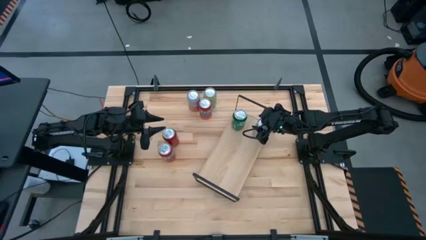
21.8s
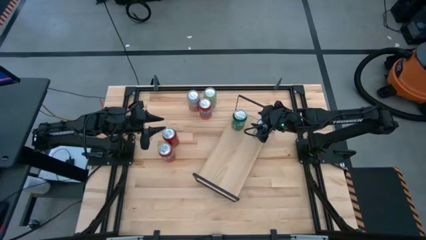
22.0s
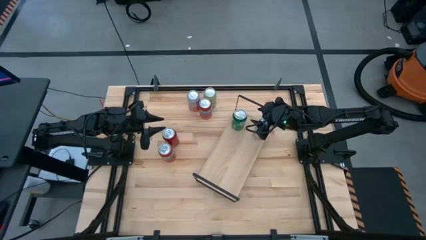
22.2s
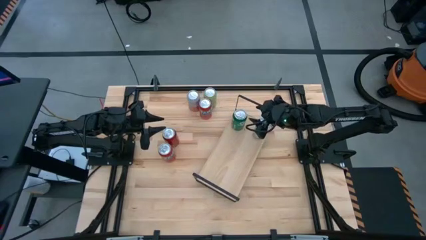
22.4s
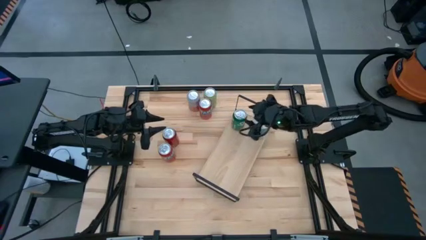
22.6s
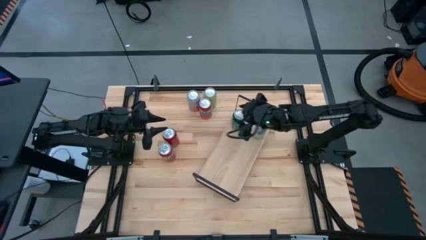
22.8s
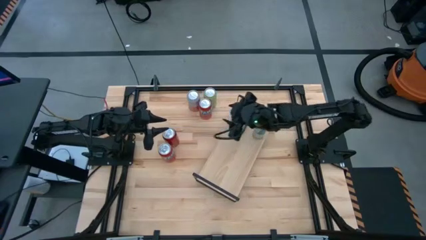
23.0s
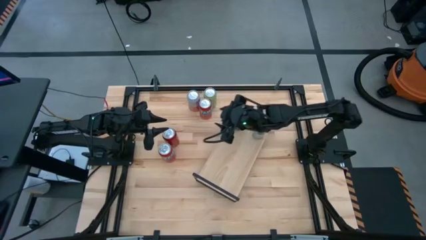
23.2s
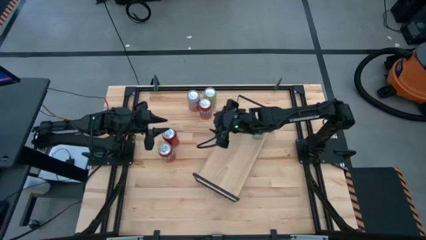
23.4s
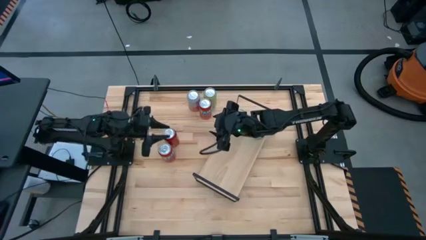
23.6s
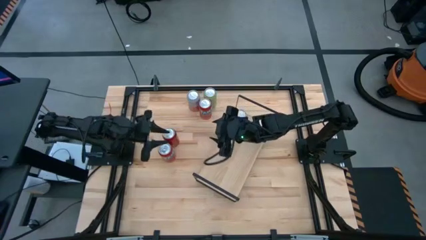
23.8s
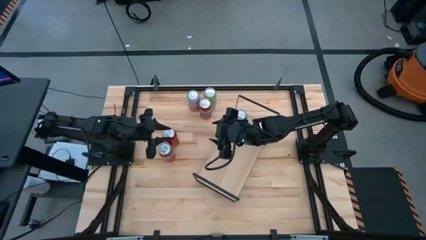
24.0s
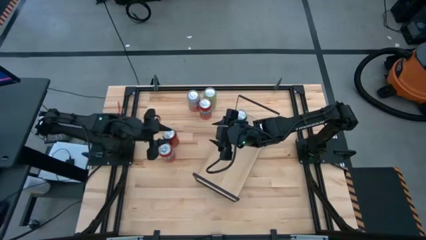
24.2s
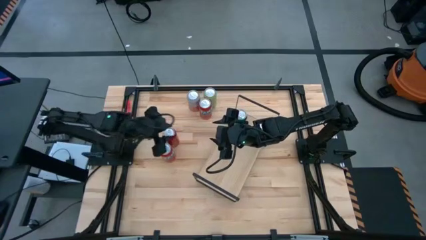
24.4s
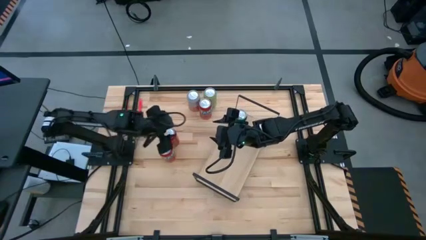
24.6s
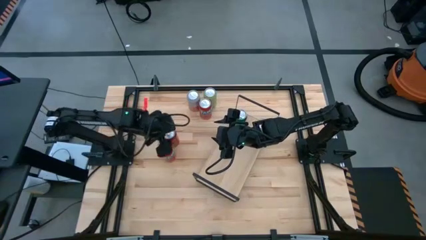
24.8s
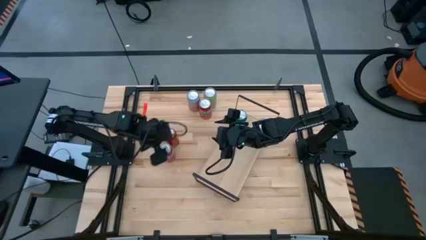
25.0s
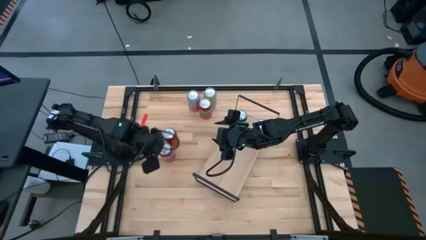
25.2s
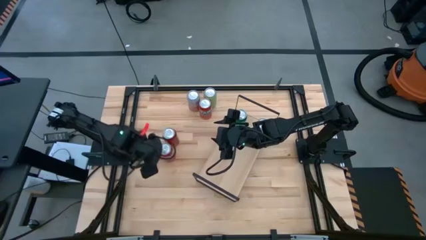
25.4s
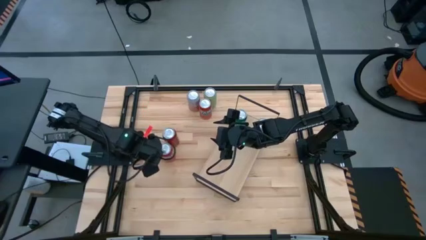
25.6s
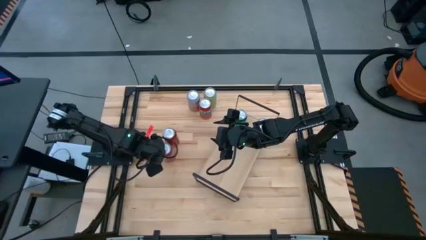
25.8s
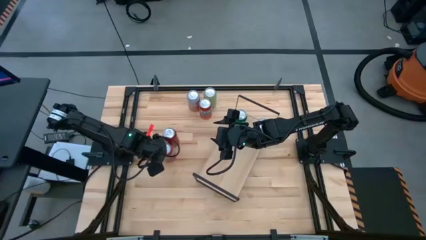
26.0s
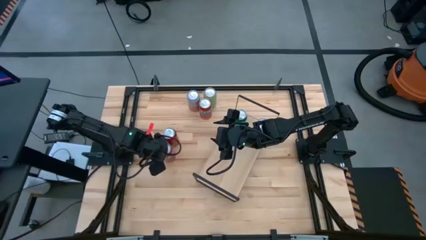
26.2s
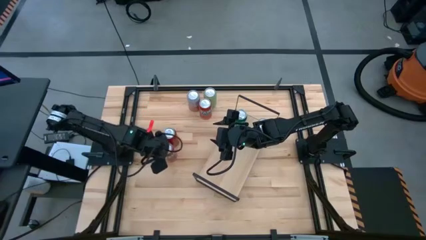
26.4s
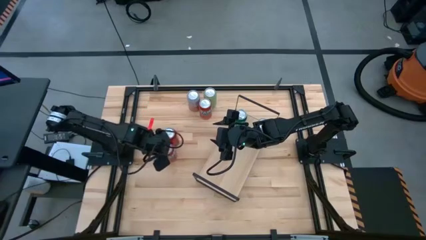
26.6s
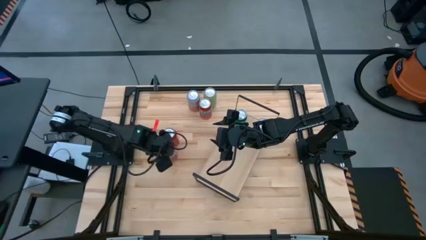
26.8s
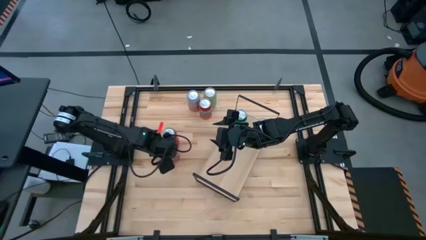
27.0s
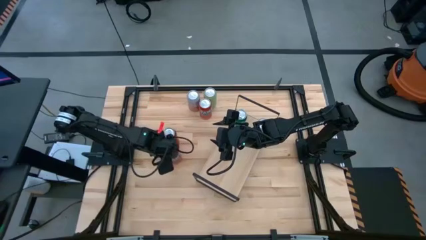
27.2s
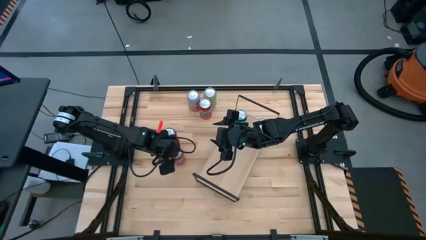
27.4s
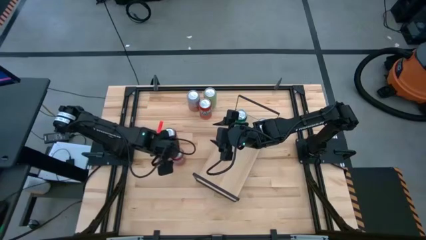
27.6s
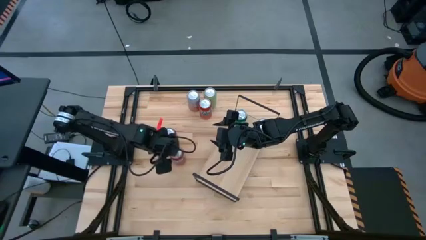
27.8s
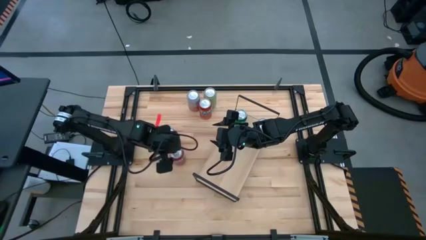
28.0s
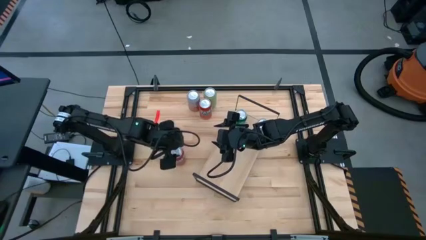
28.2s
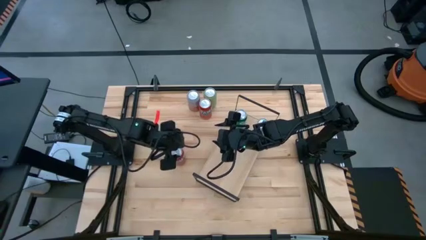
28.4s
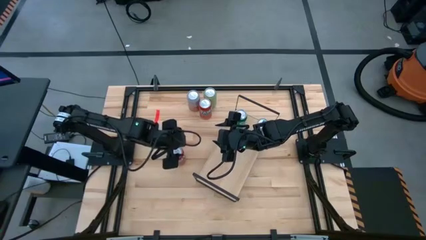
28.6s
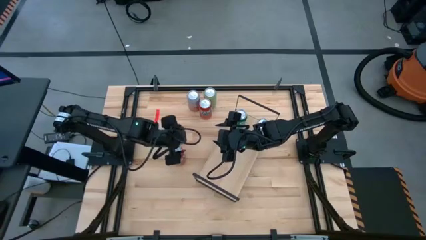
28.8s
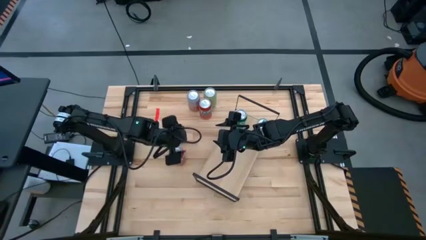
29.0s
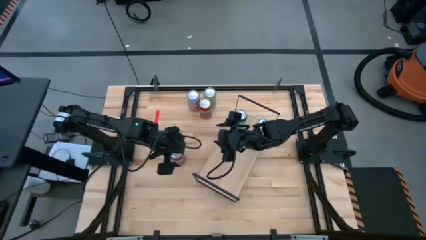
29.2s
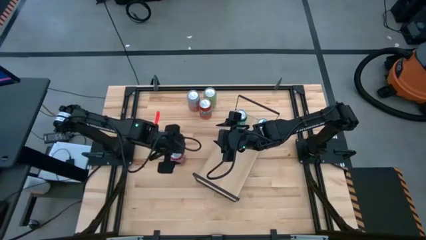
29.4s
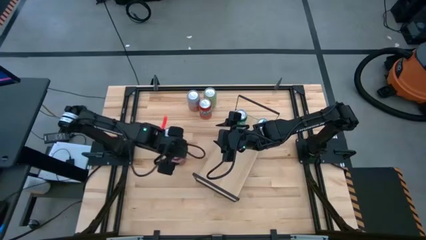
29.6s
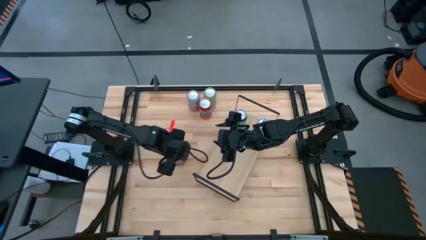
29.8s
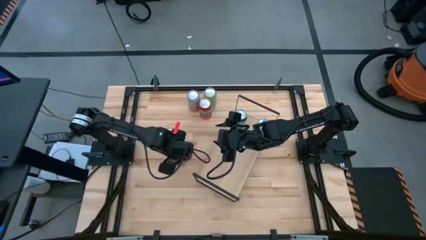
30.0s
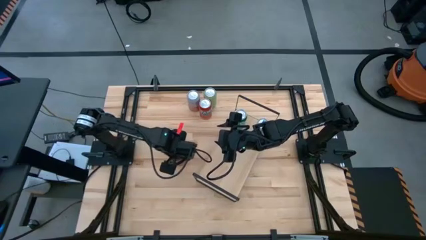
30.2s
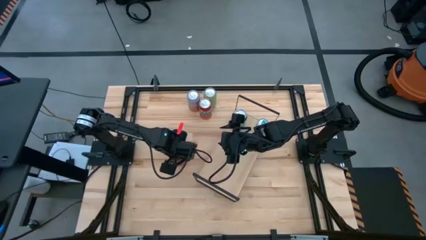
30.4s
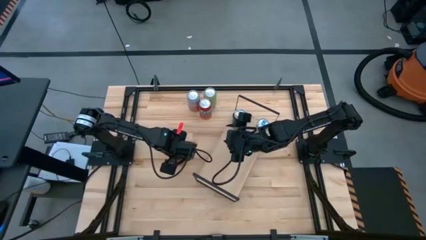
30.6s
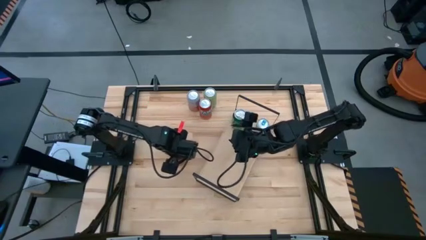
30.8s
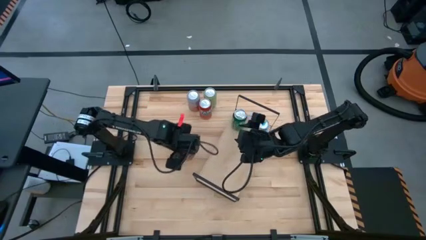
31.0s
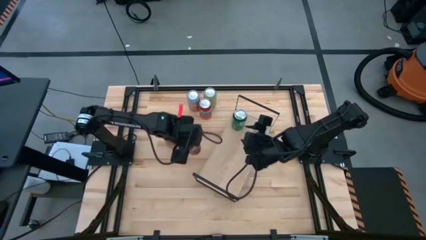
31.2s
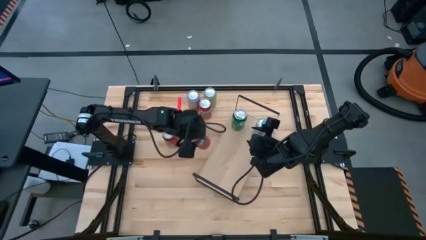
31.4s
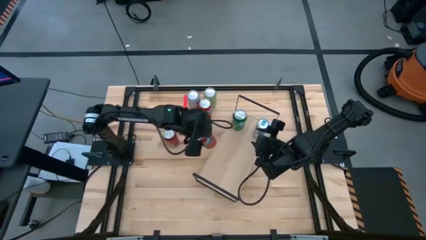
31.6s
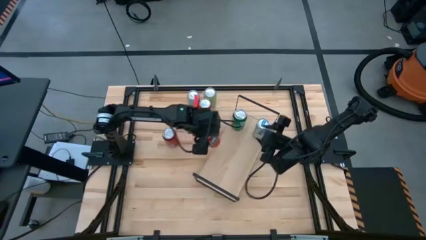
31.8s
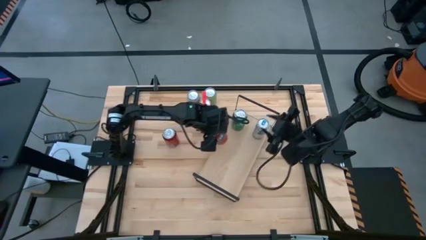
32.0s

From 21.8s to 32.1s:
Task: Place canned beverage on shelf
Put the bottom orange soda can on the shelf

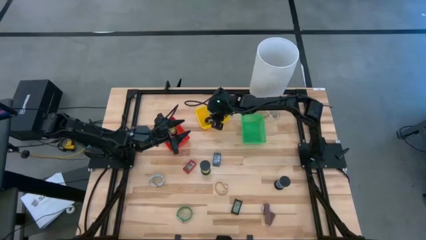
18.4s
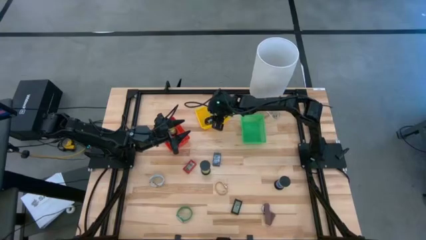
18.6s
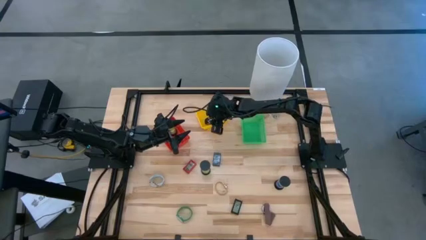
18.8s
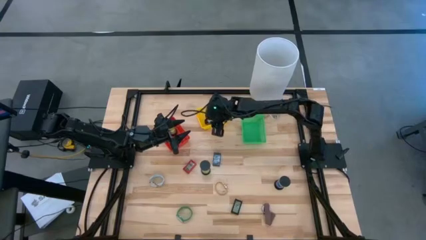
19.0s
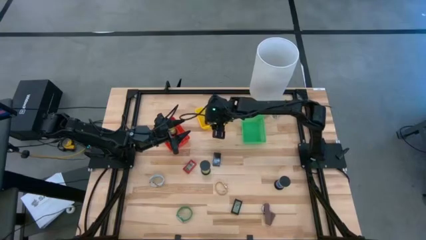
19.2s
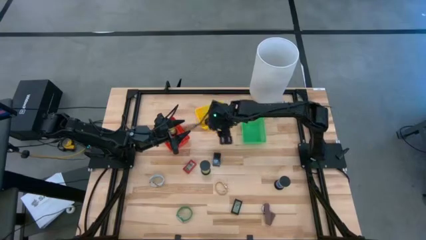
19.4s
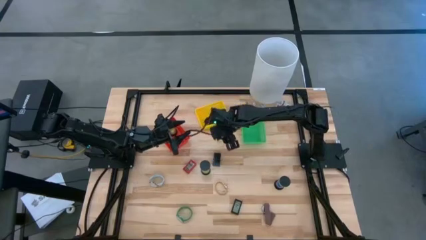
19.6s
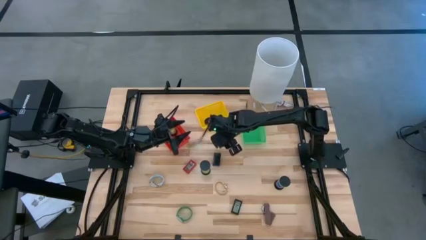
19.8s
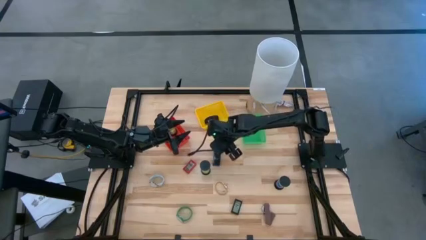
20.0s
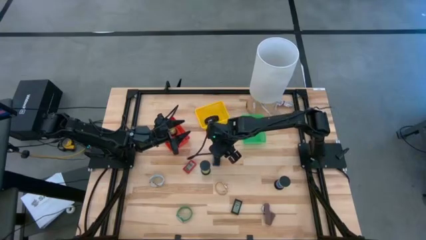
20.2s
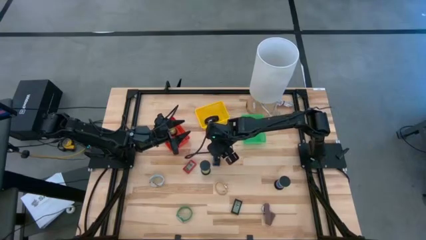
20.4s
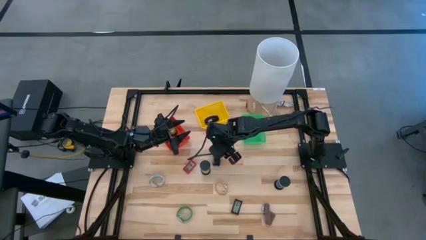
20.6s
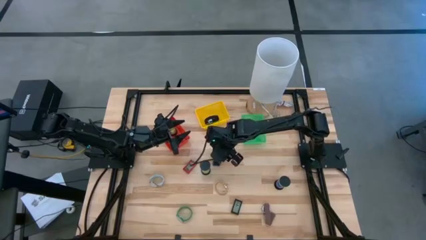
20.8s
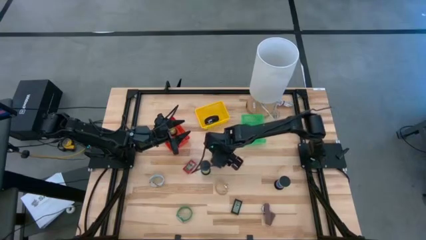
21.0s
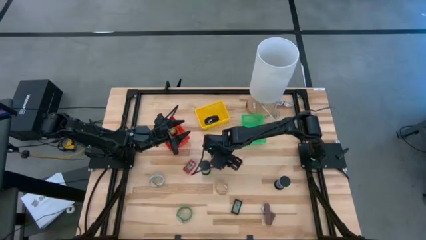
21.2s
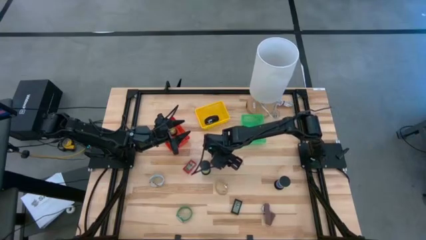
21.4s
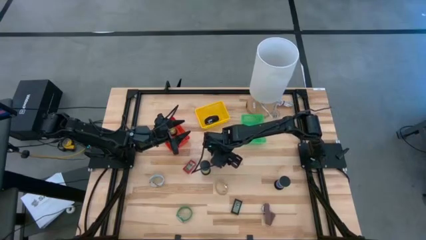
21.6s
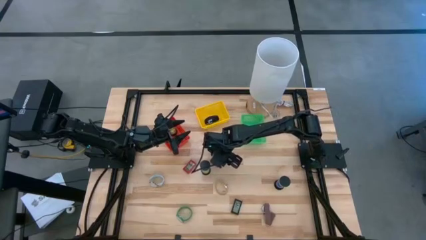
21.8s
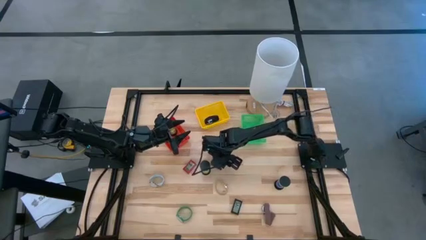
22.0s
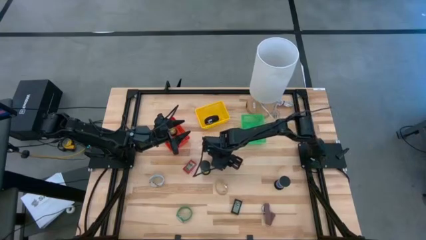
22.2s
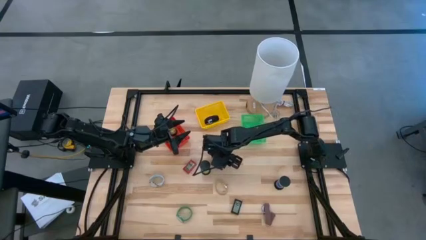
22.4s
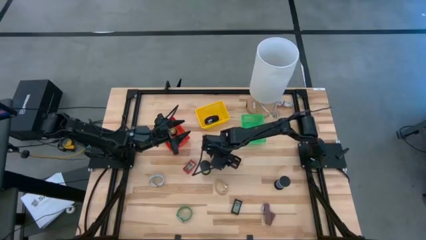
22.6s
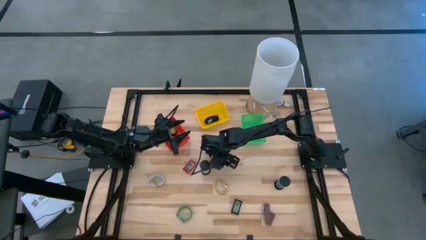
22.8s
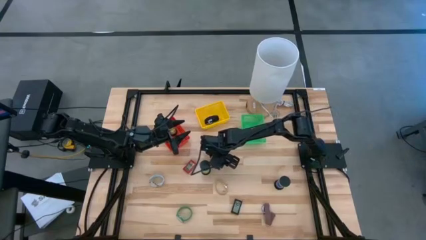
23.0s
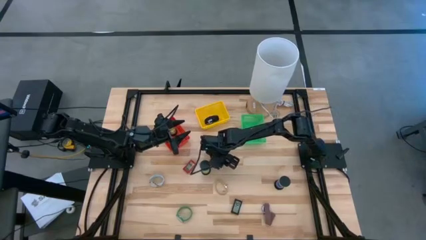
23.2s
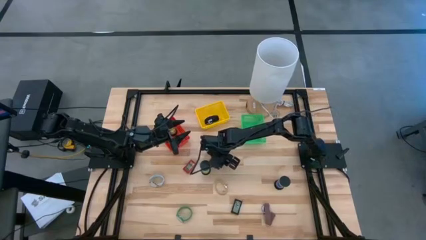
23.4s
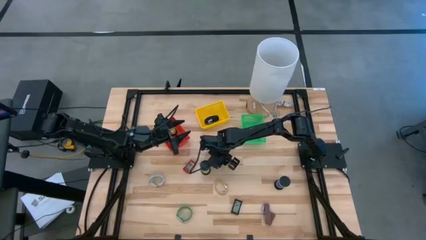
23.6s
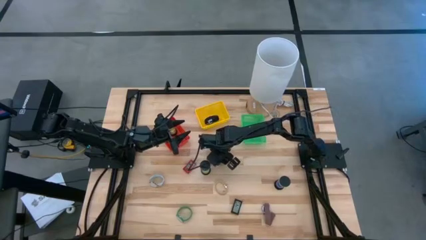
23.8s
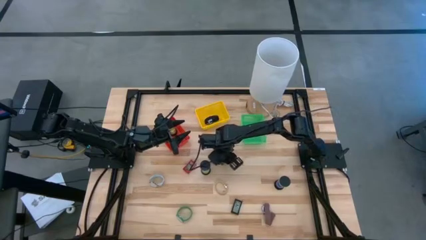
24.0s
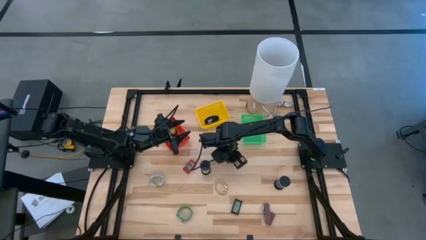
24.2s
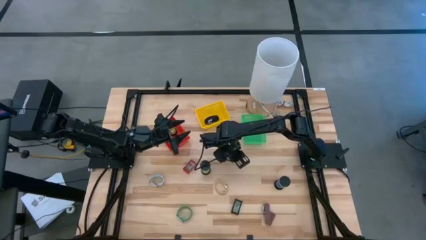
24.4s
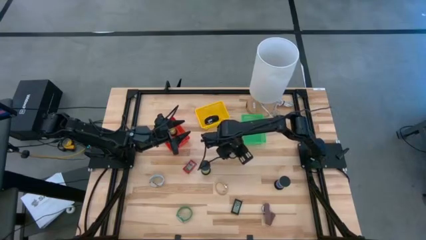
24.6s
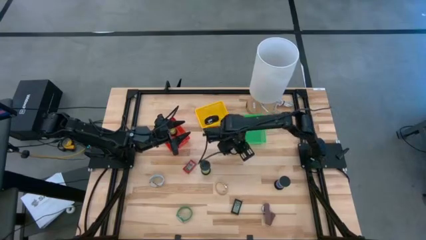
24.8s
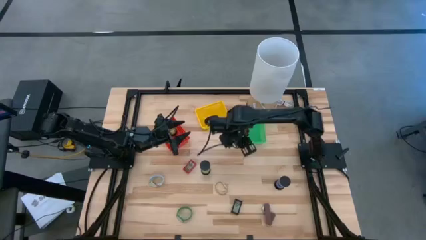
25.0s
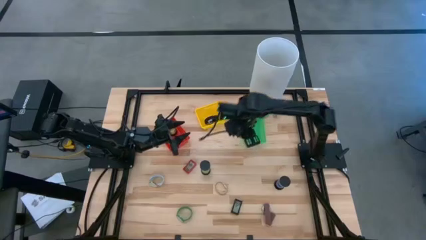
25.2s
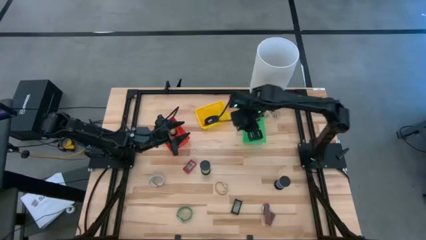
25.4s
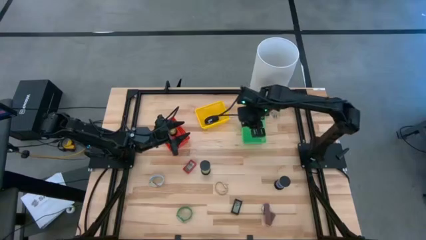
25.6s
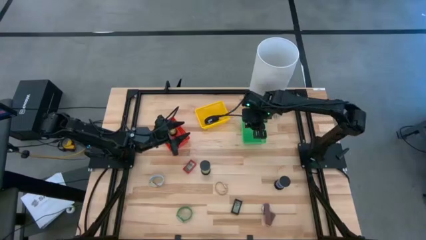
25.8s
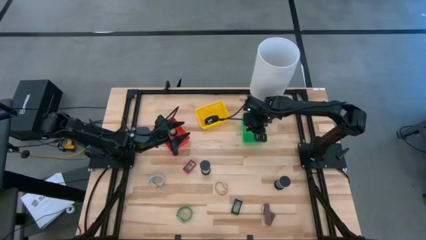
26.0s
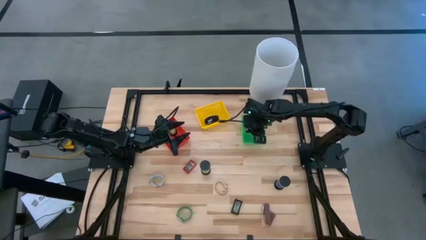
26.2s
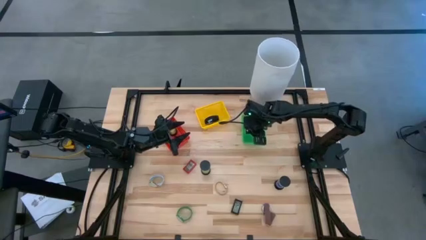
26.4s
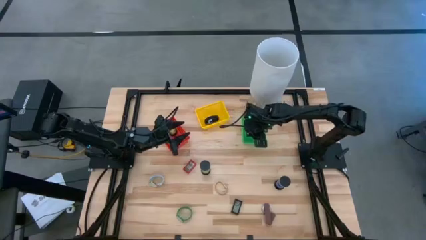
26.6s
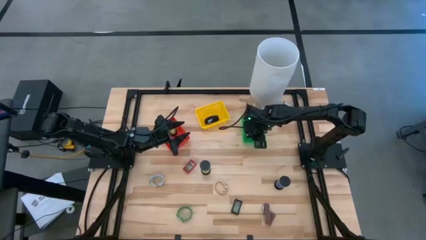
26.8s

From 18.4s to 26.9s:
Task: Pick & Place Office items
Put the center black digital clock into the green basket
